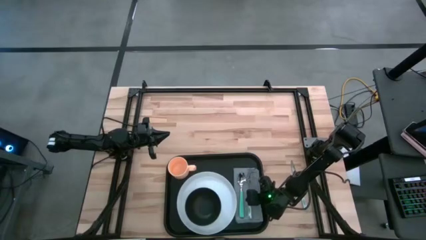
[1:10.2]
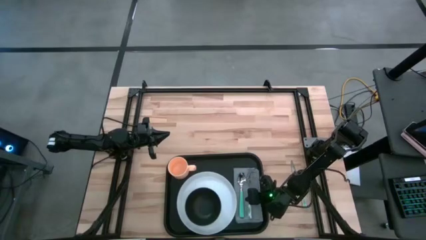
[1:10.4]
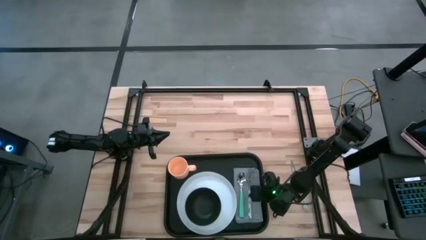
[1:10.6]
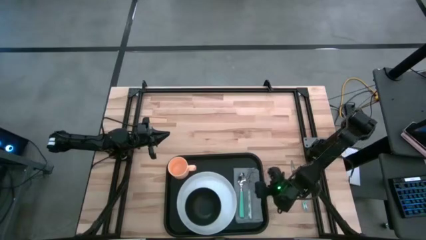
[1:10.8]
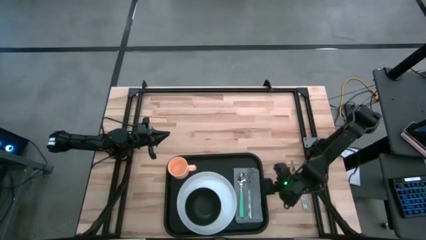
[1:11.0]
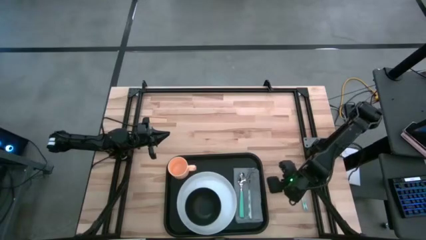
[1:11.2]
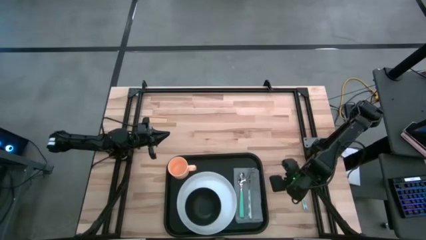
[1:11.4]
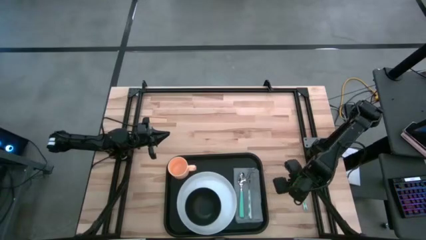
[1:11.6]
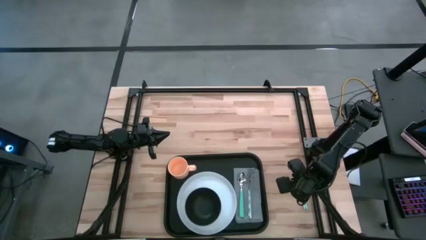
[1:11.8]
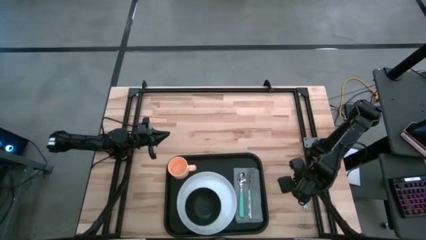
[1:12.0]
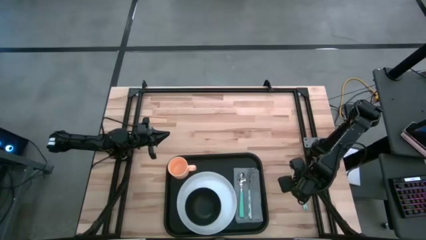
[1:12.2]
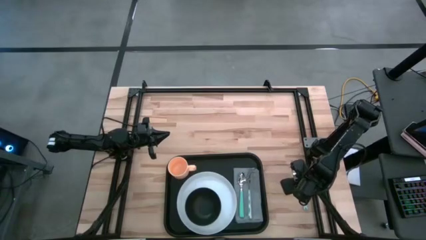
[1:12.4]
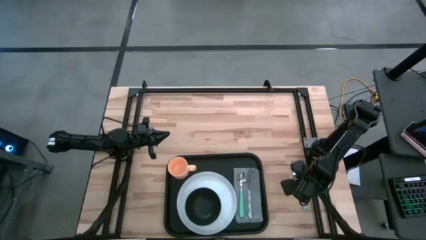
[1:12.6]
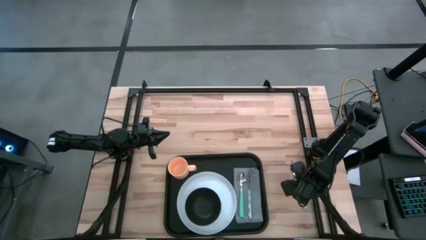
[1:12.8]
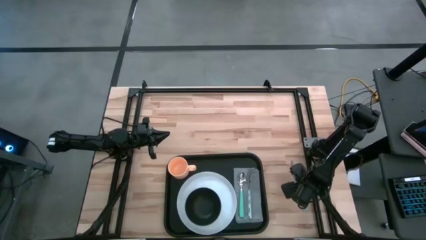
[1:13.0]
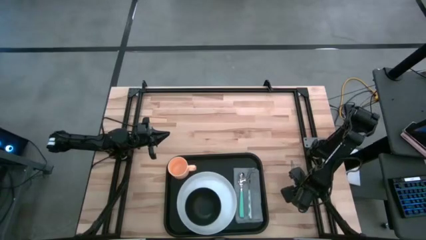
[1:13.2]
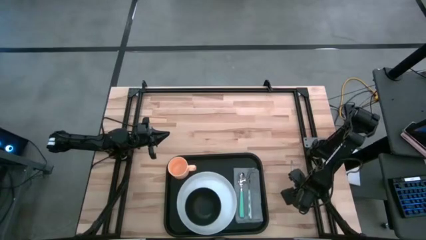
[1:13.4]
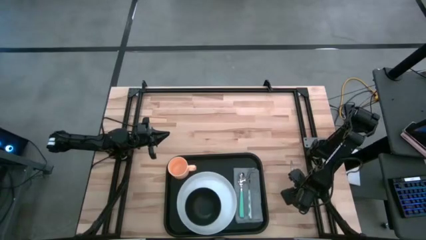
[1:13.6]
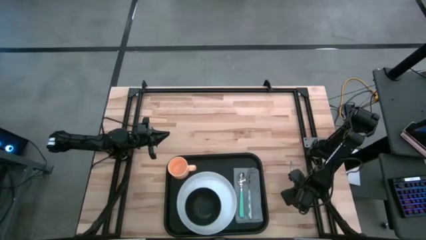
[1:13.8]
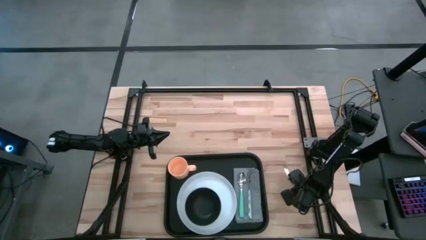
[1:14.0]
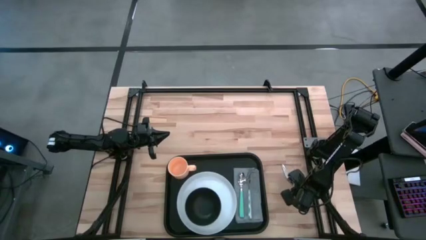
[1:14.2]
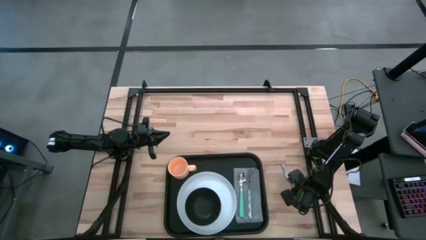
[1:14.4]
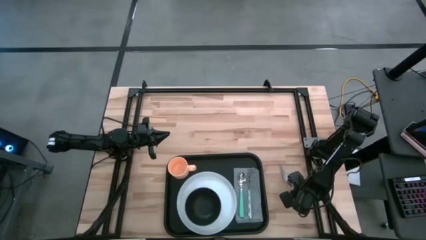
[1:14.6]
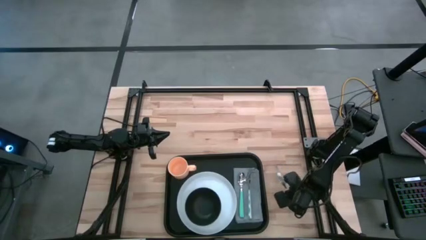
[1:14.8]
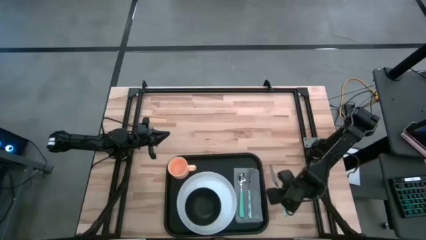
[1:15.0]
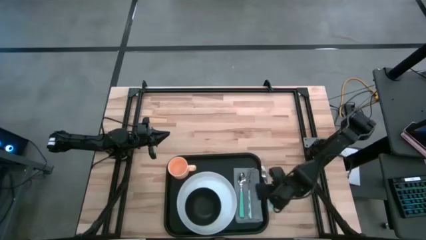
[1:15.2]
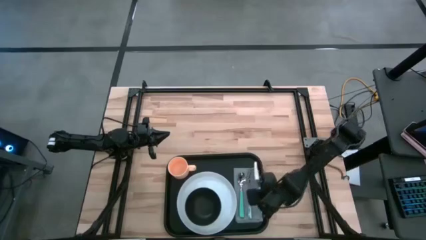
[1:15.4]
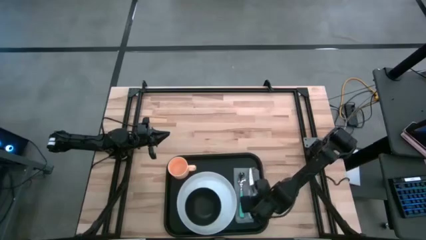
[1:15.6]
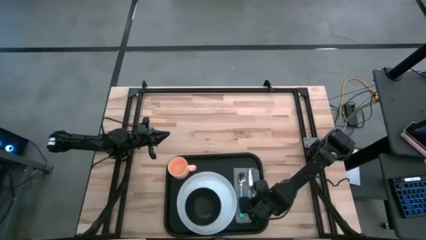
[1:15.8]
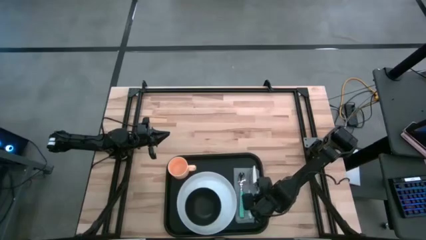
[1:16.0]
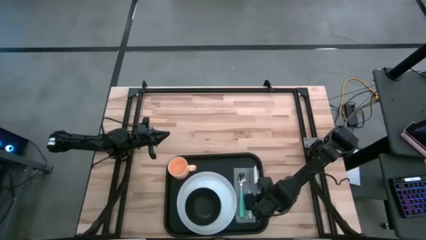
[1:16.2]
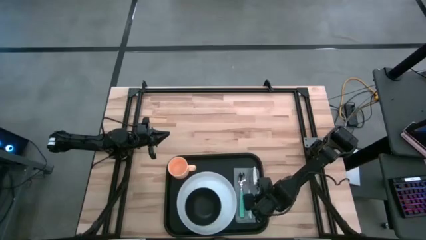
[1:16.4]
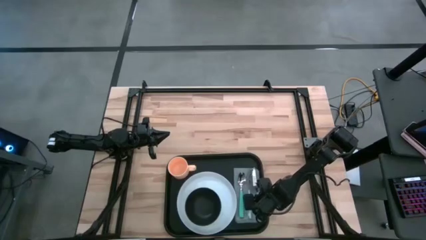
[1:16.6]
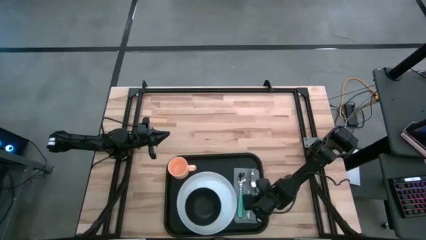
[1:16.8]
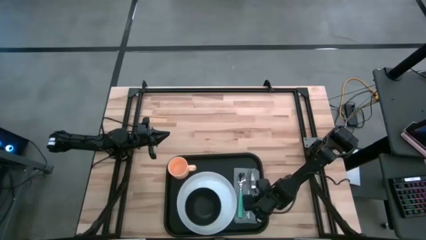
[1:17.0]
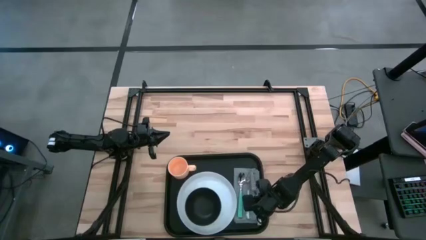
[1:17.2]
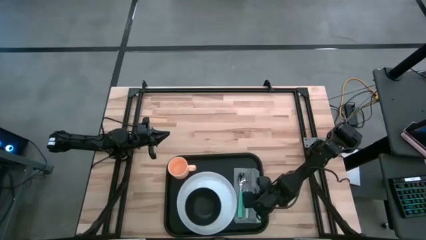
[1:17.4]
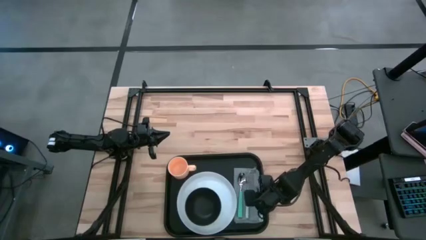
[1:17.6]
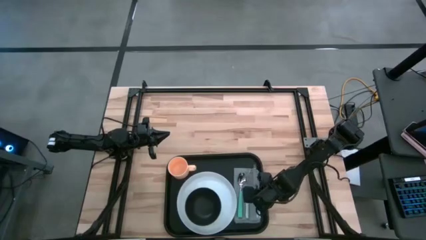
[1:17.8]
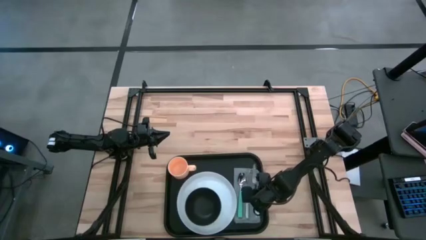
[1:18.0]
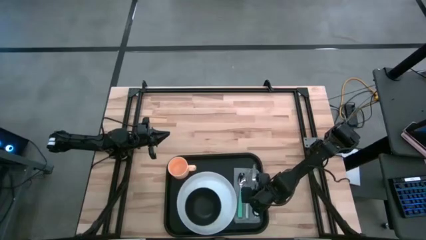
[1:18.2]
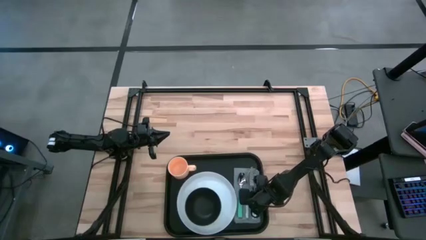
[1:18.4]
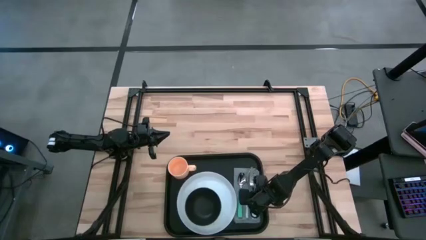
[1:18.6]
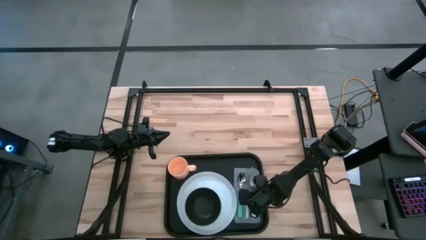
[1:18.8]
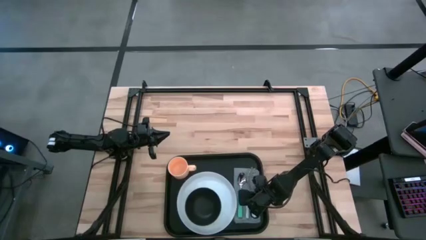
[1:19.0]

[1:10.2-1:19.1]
Task: Set up tray
Put the blue patterned knife on top of the gray napkin on the black tray to the right of the blue patterned fork

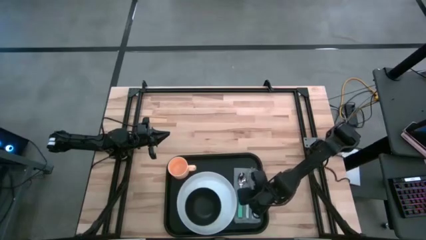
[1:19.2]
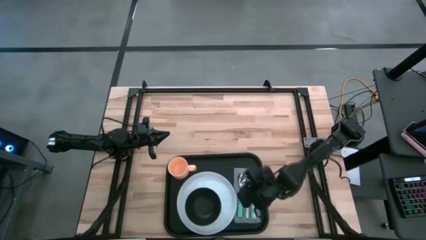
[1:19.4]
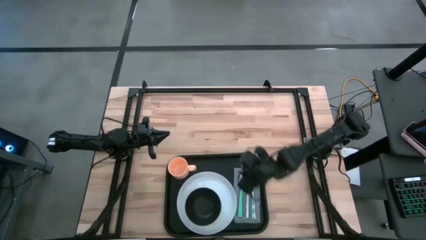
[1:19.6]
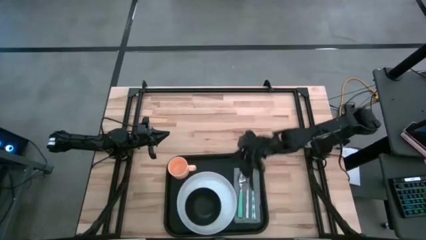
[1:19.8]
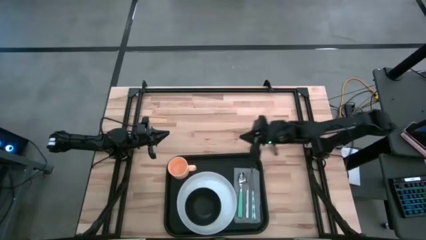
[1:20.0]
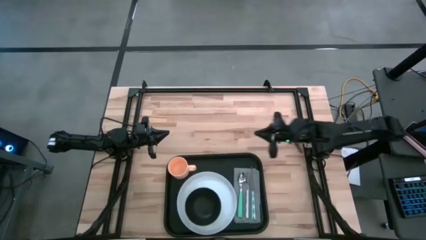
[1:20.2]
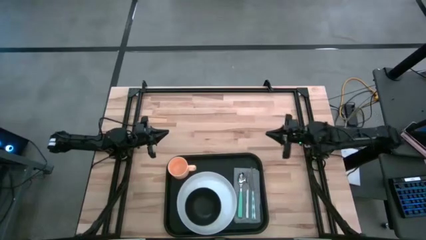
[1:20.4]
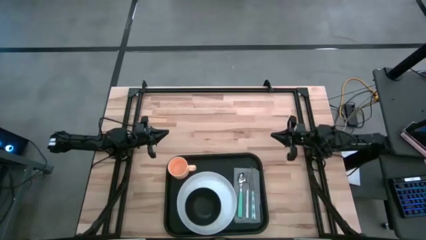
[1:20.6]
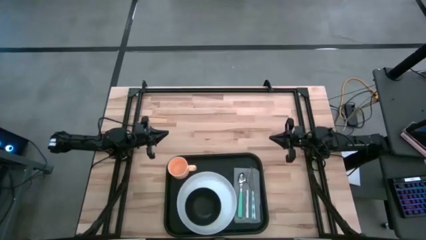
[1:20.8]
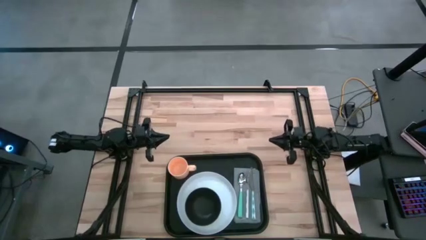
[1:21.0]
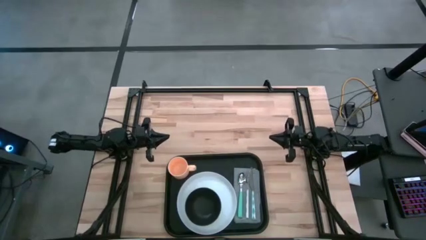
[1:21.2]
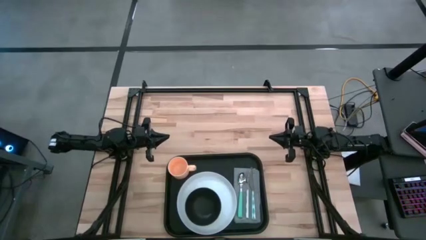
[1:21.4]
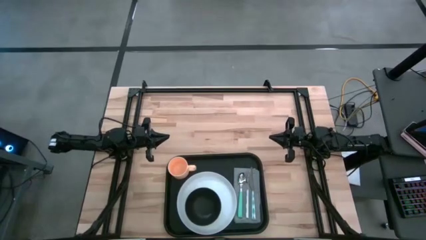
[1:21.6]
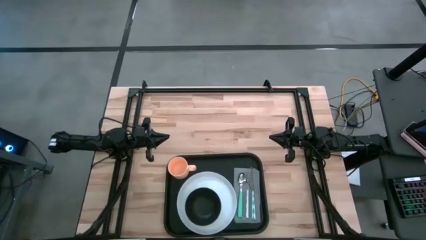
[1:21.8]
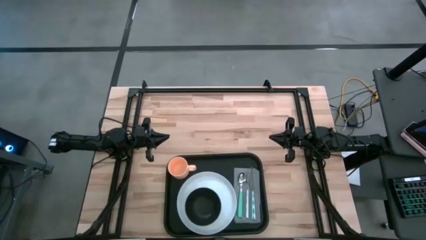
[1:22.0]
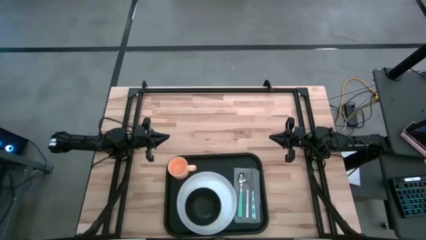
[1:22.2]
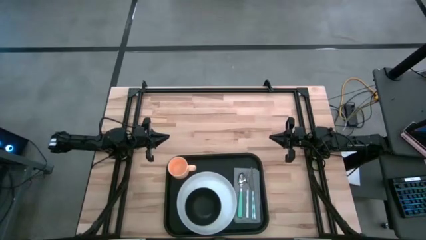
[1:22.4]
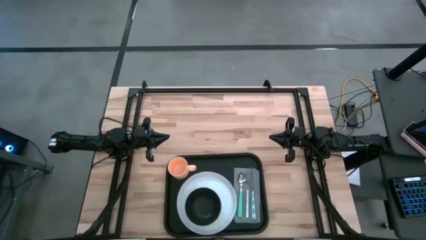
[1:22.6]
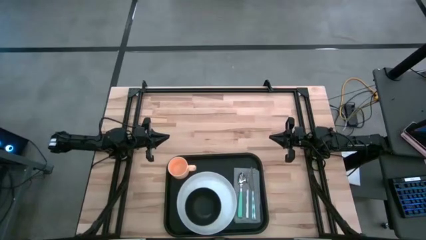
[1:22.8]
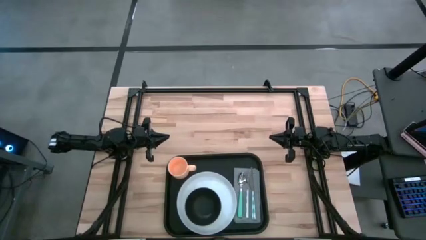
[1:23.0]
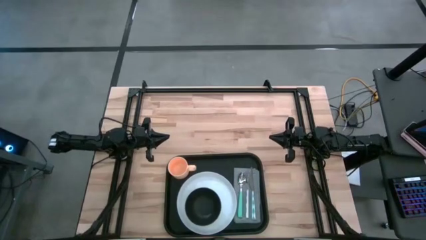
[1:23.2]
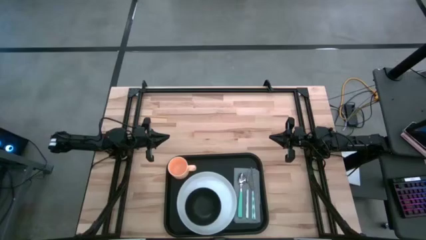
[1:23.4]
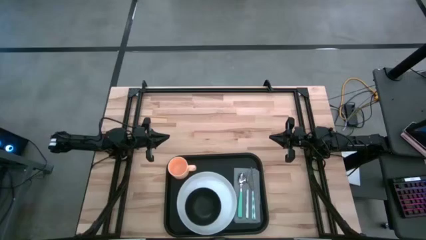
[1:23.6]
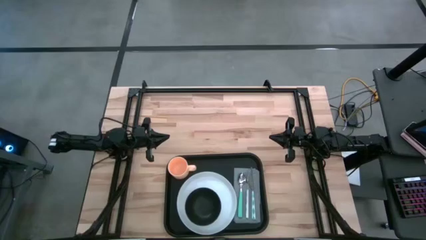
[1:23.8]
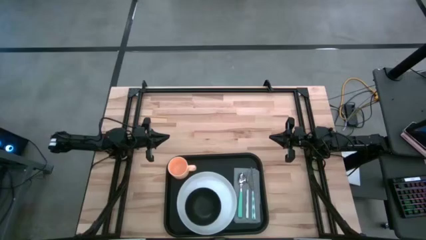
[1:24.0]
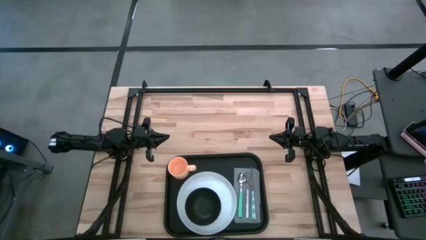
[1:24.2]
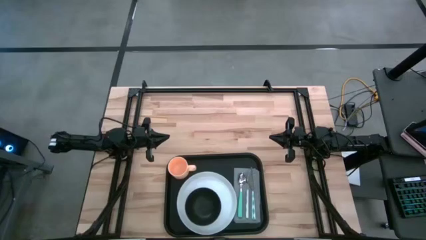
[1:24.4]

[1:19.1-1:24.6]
Return to Home Position

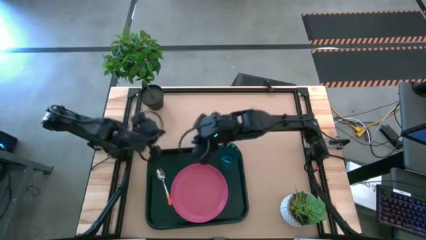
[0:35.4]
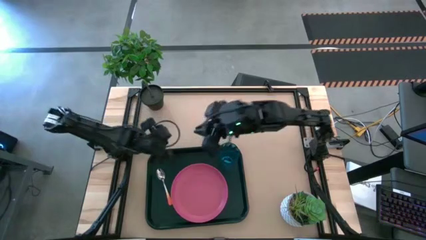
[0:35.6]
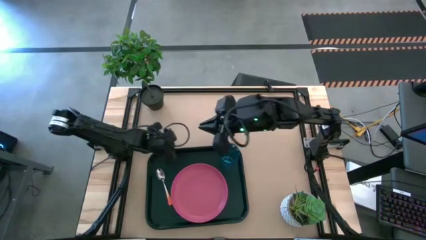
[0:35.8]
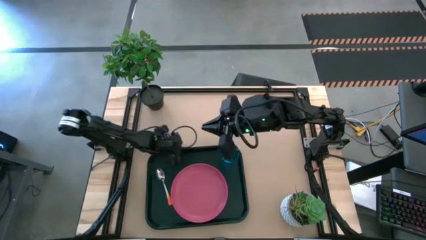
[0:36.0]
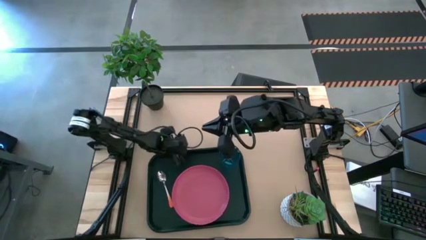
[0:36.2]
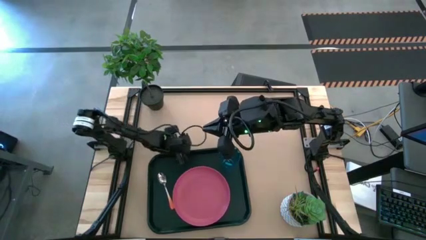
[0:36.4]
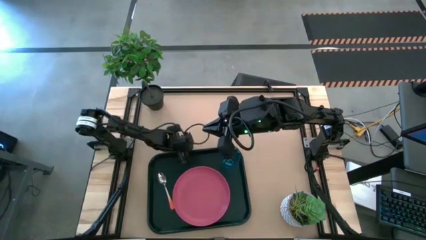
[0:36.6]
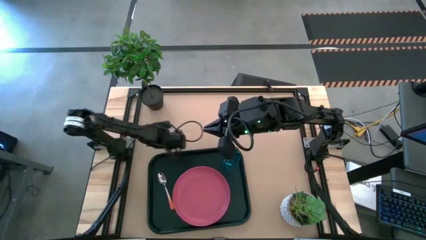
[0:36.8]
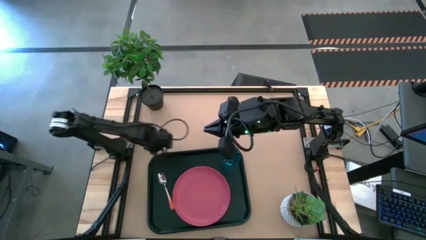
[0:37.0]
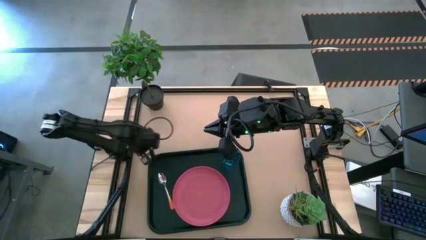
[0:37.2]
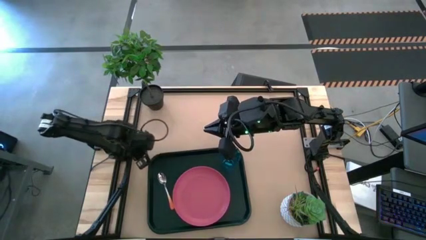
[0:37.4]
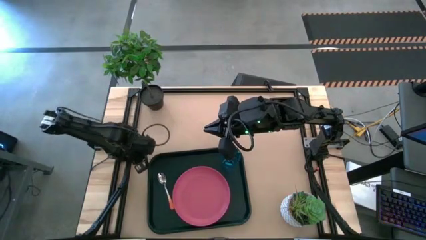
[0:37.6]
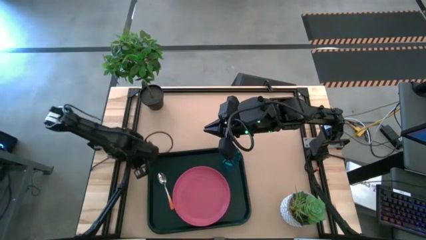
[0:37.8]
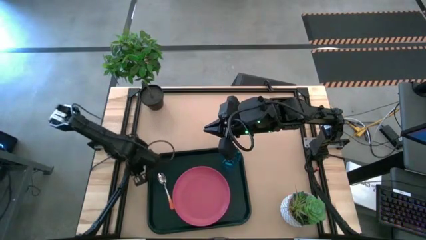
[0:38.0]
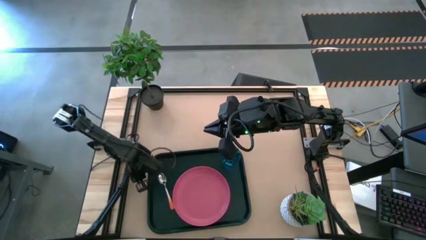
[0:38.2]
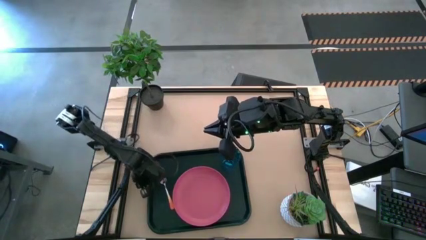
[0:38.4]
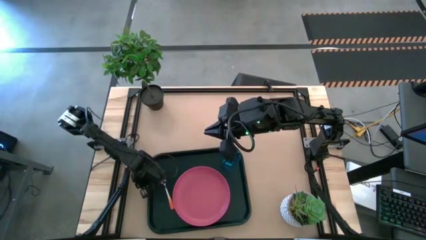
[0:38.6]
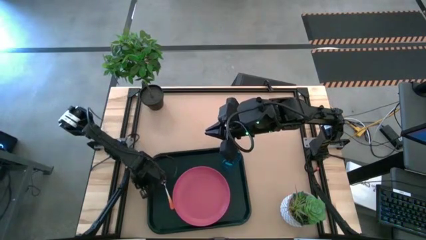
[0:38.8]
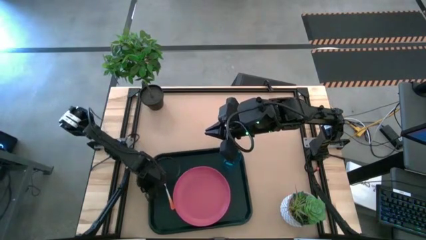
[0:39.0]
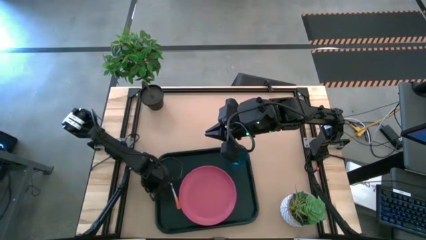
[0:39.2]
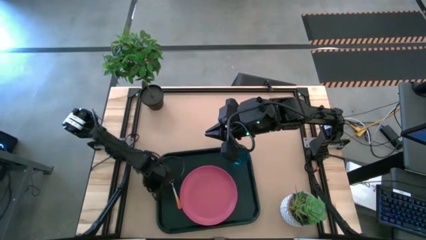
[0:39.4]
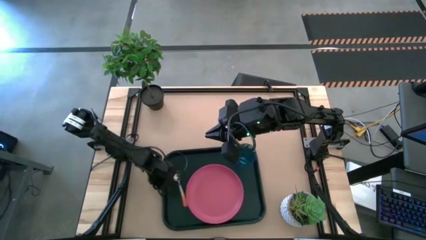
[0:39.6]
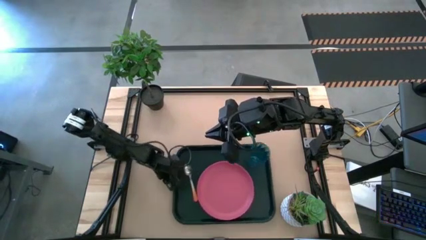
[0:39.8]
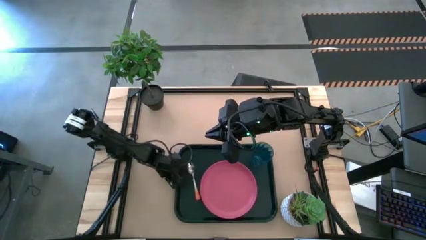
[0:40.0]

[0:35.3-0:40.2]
Task: Pick and place plate/cup/fork/spoon on tray
Move the black tray to the center of the table
